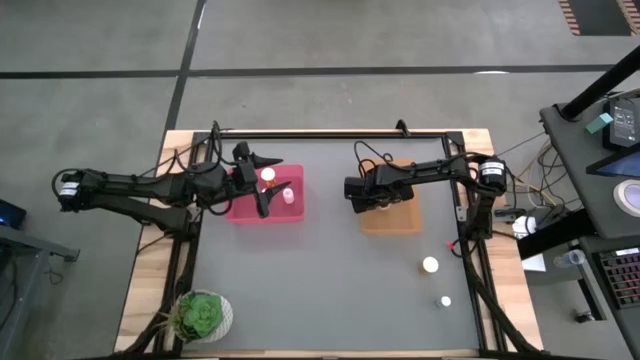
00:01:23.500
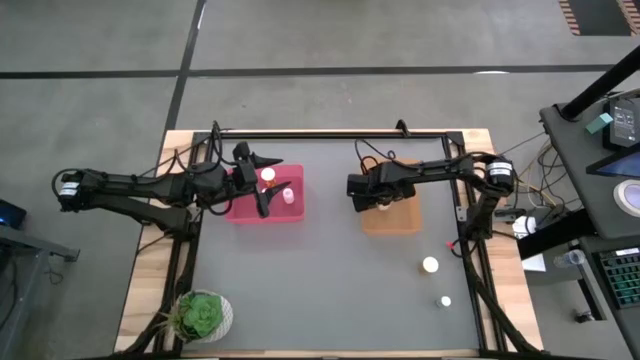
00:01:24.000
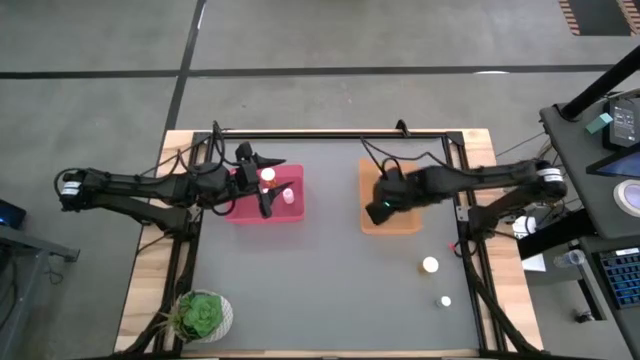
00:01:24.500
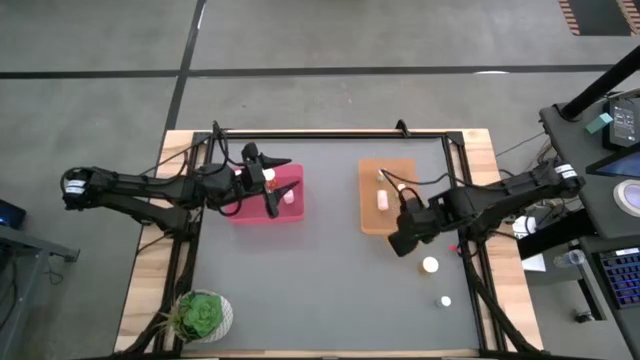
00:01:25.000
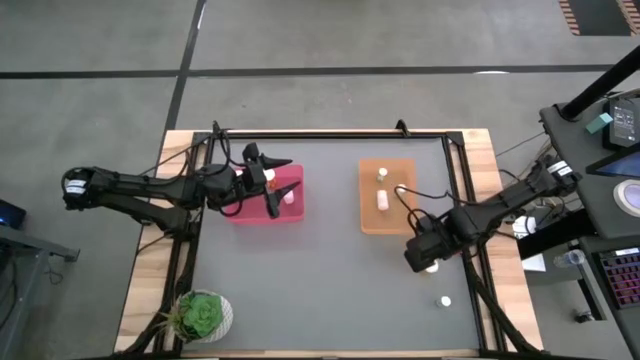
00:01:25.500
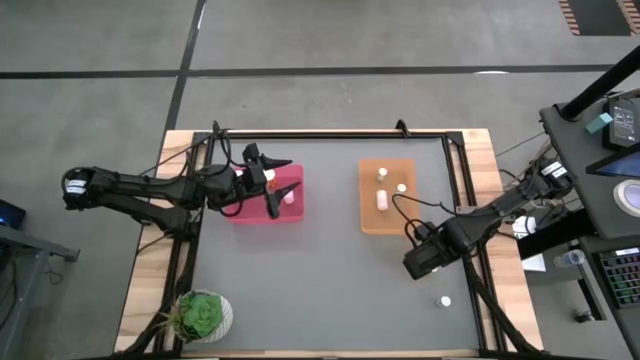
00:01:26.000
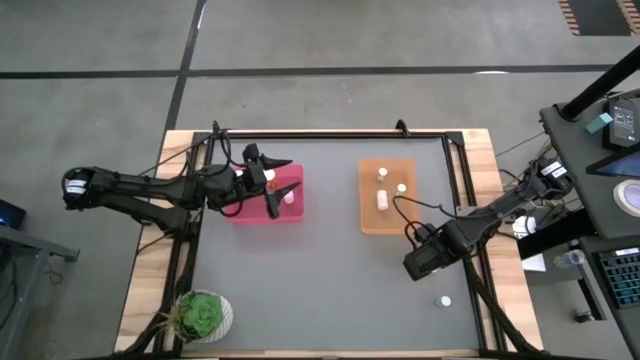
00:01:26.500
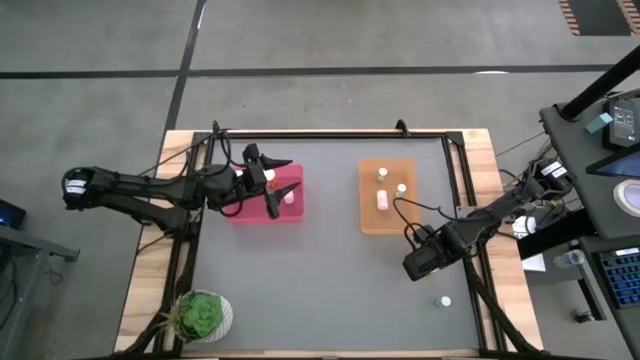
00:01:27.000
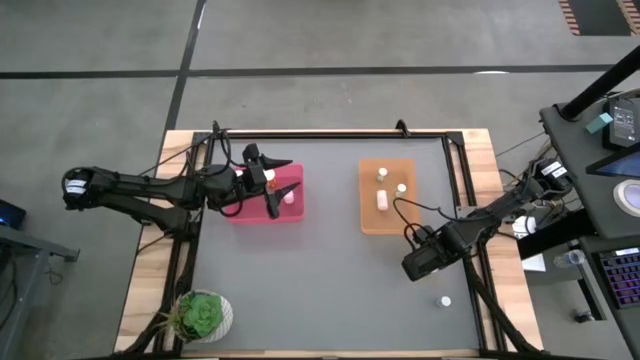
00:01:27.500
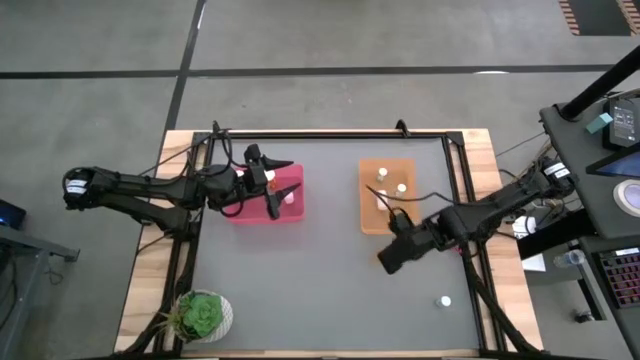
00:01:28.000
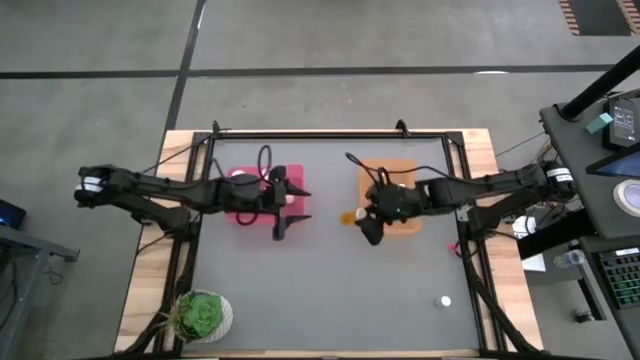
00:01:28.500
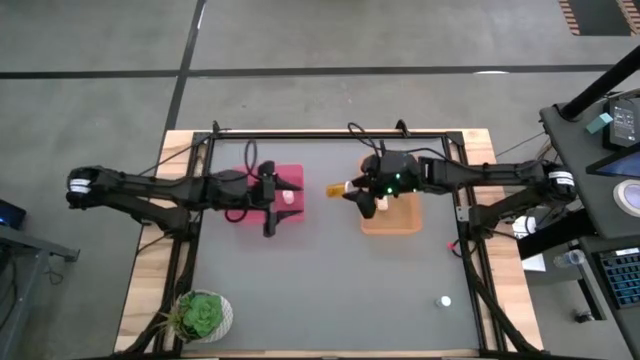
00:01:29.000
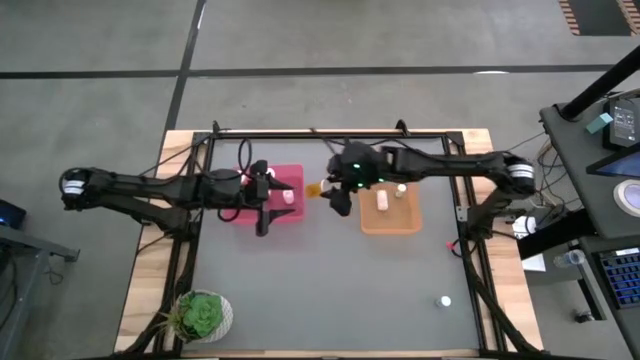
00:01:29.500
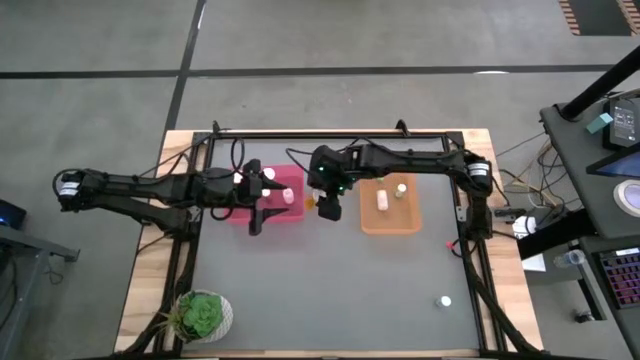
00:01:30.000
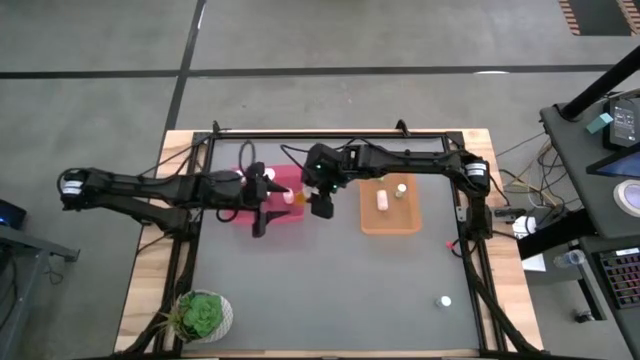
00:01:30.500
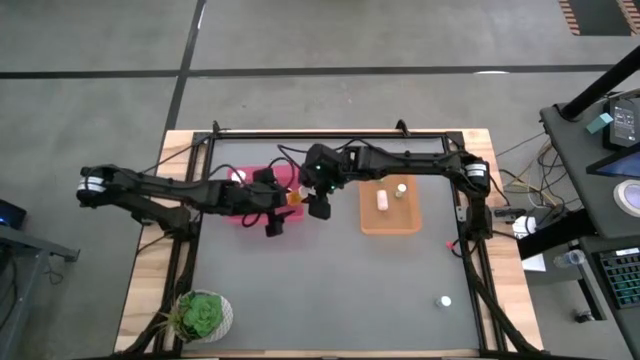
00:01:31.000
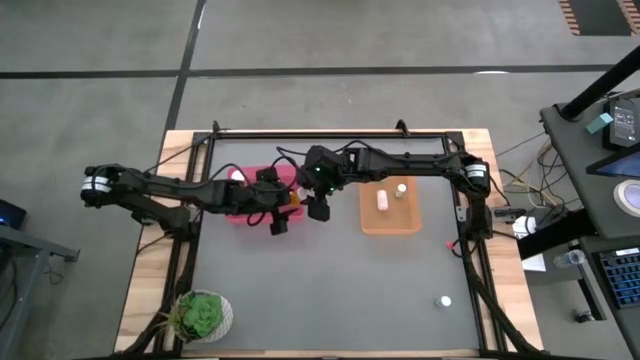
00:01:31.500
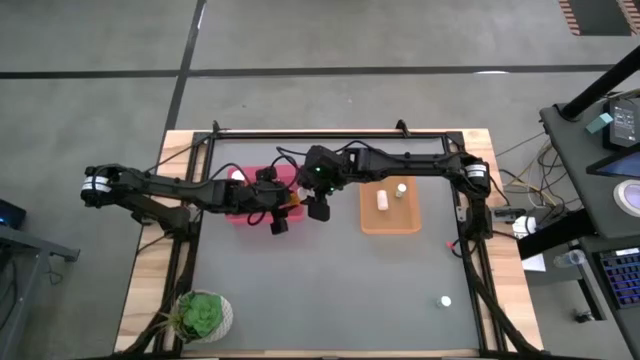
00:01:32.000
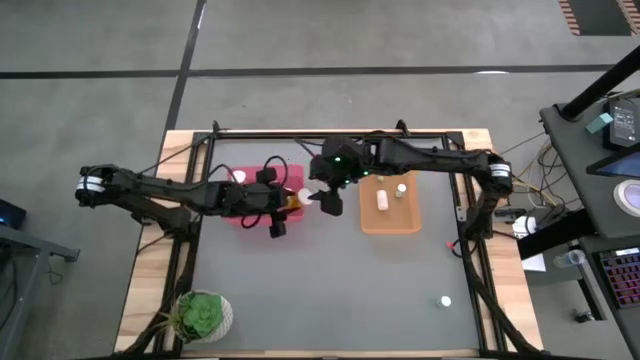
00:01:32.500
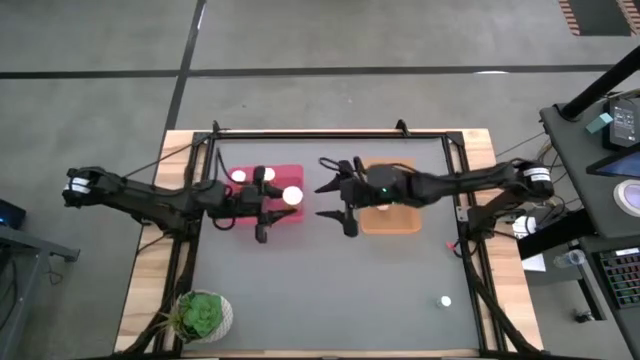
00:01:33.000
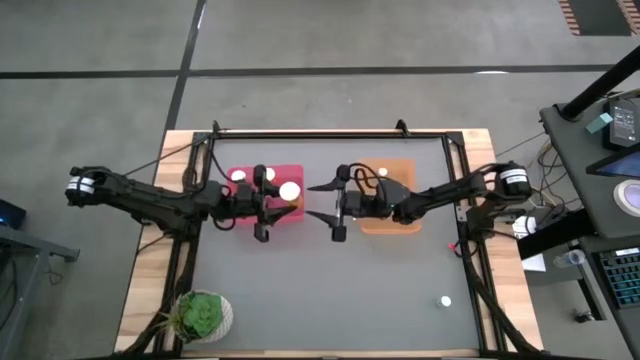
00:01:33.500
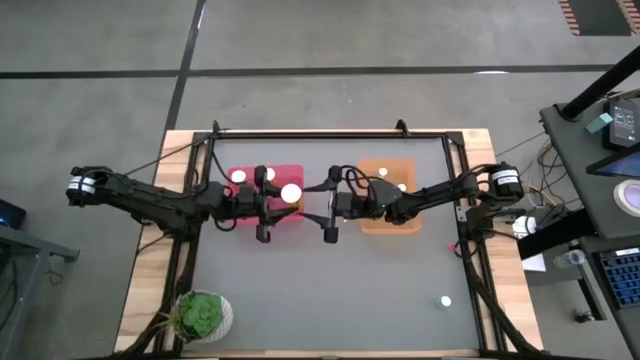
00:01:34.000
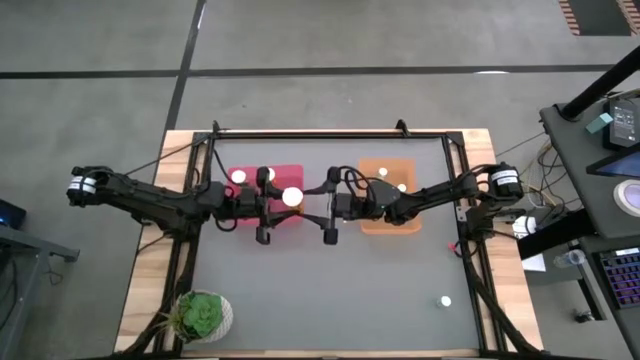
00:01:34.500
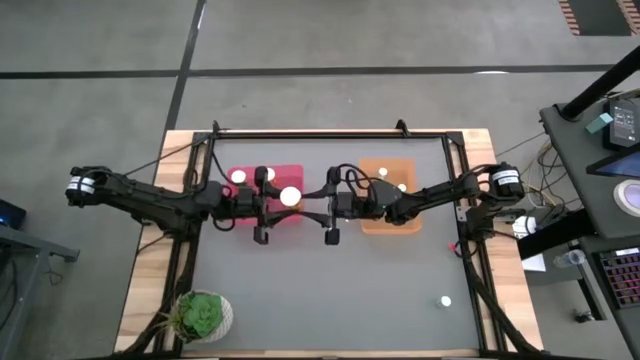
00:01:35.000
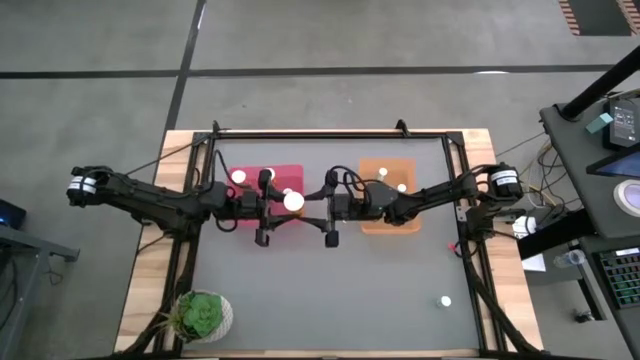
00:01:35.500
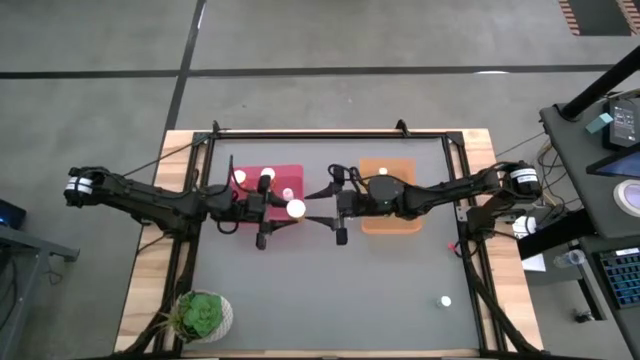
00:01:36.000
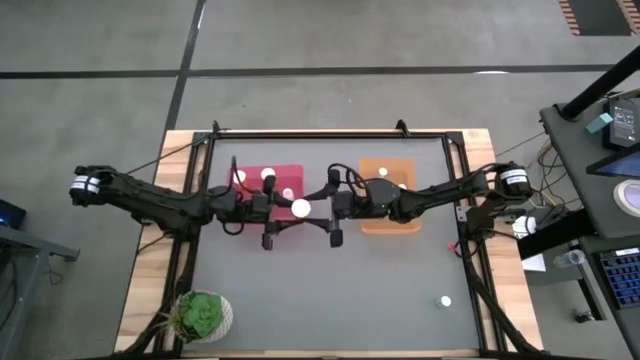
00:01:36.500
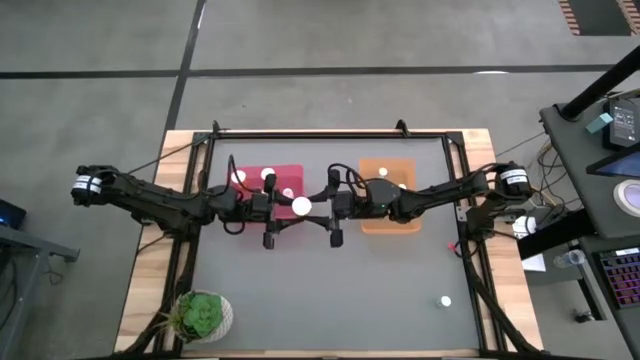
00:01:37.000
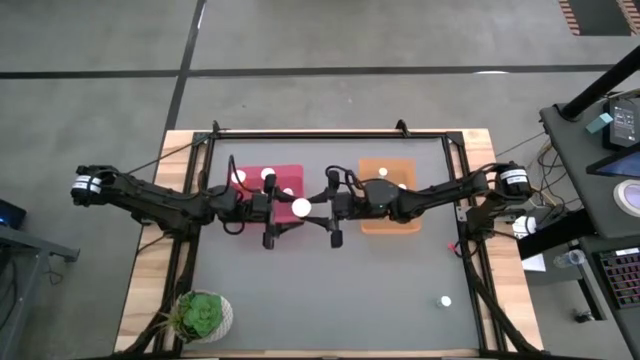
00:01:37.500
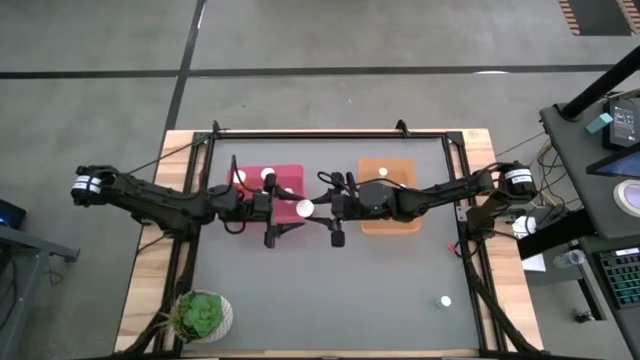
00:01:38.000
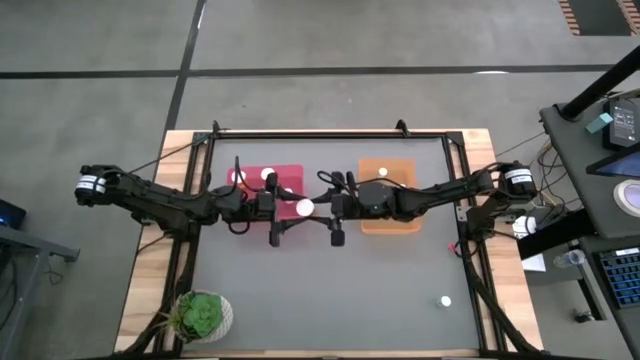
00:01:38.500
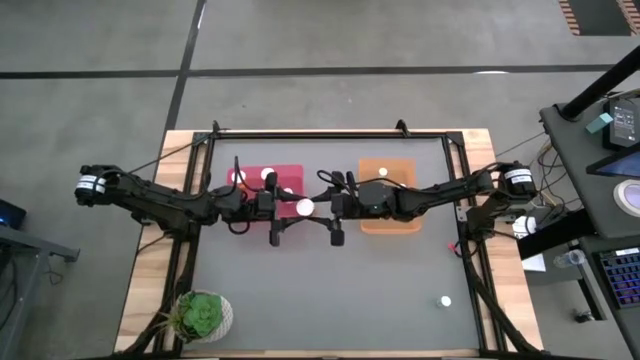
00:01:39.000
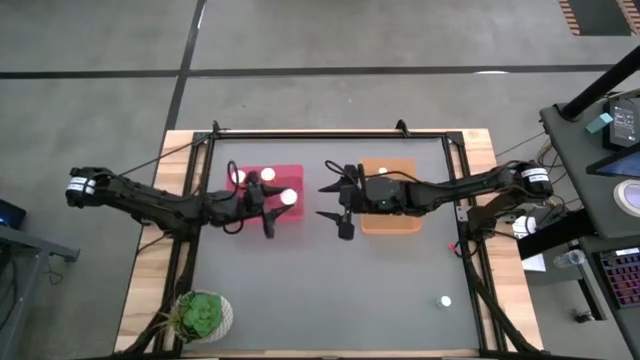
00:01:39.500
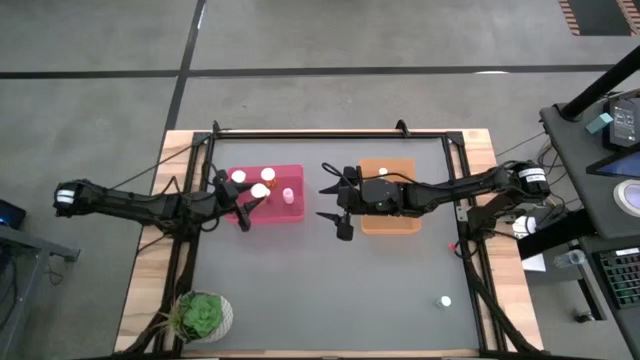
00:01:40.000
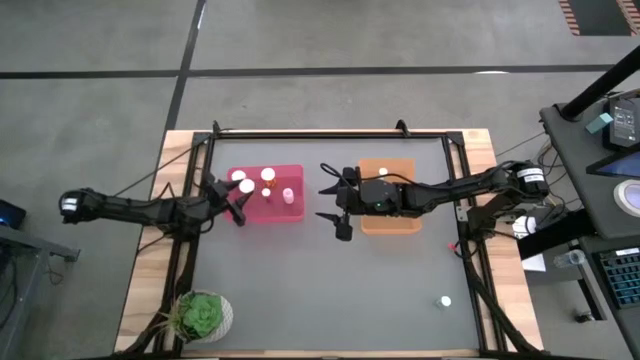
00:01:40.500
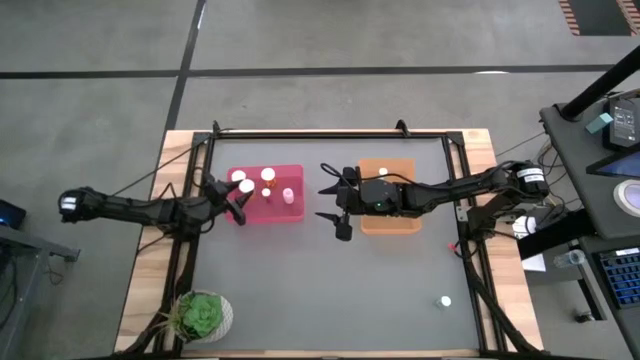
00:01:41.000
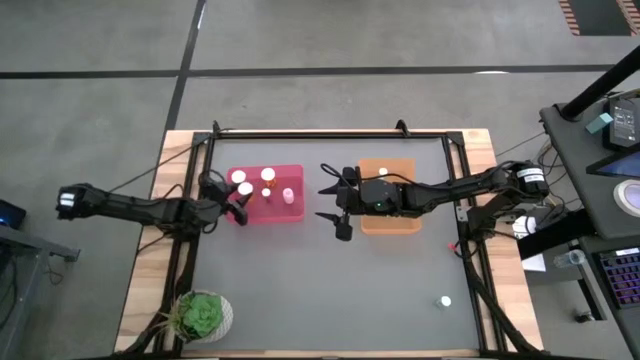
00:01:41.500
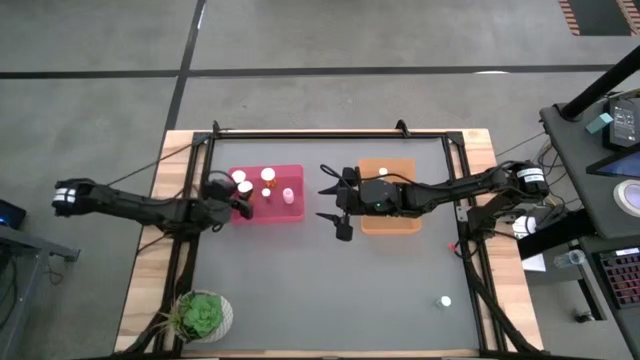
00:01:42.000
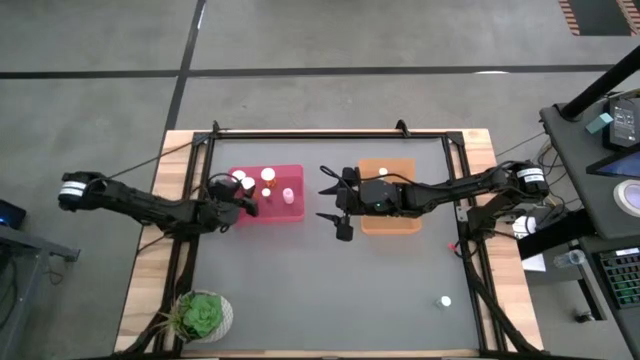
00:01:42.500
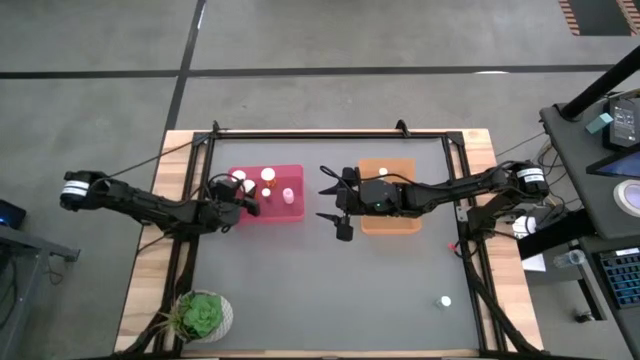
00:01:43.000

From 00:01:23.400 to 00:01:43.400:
Task: Pick and place medicine bottles into bin by pill shape (circle, oval)
Put the orange pill into the pink bin

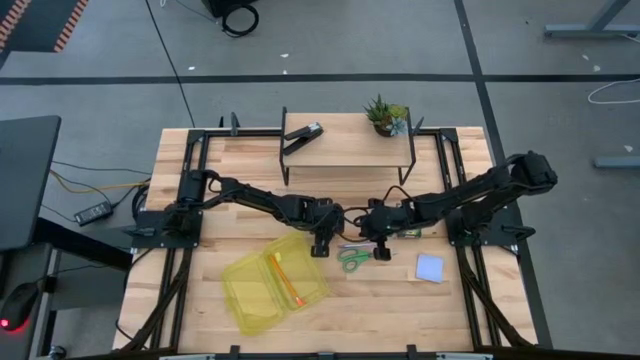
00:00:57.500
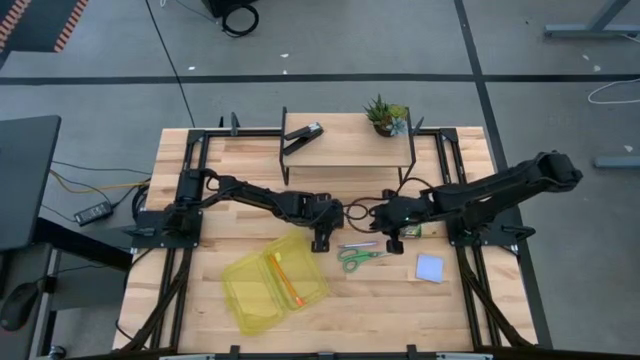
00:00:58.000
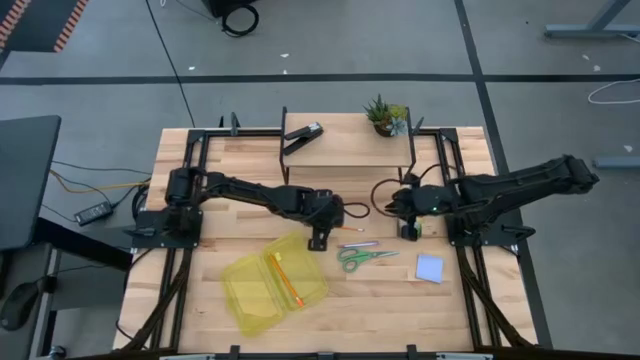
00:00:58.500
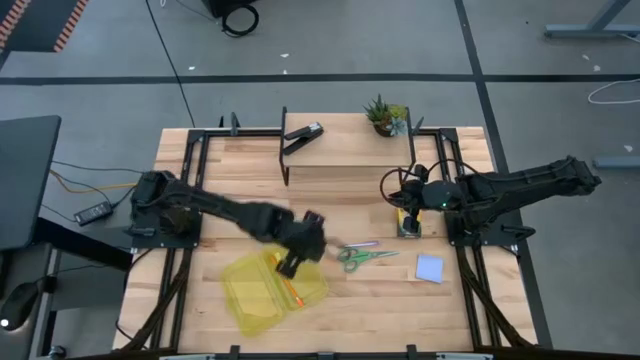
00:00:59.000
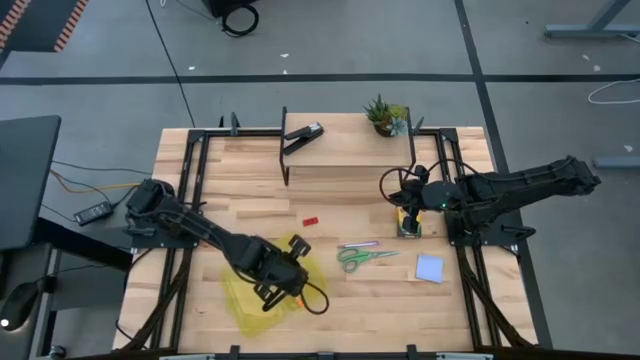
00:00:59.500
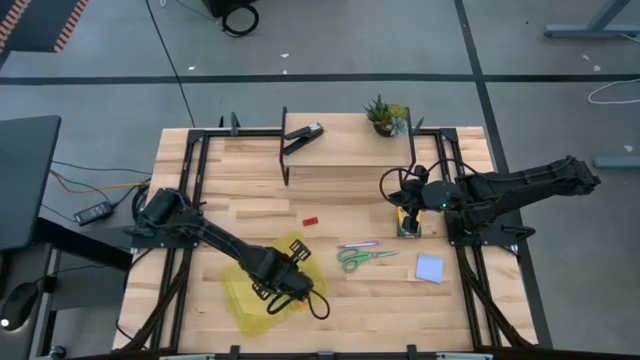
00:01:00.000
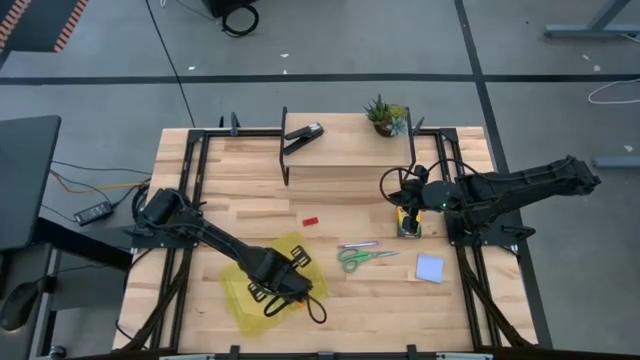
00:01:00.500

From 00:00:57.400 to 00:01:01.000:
Task: Pack school essentials
Put the orange pencil into the supply box
